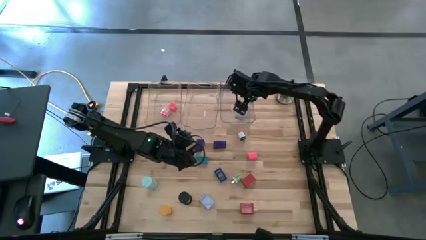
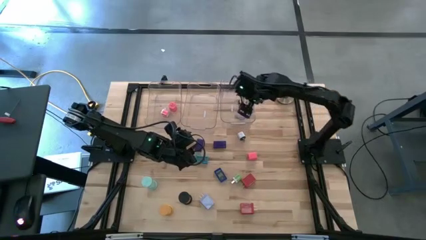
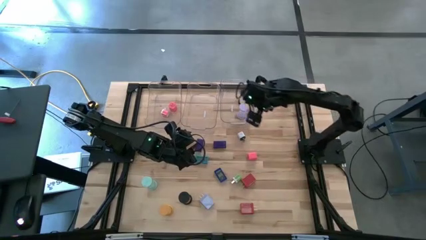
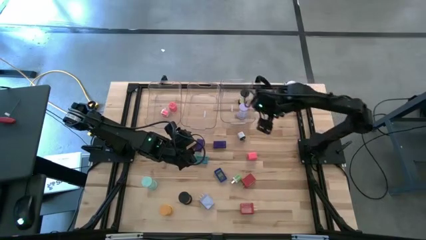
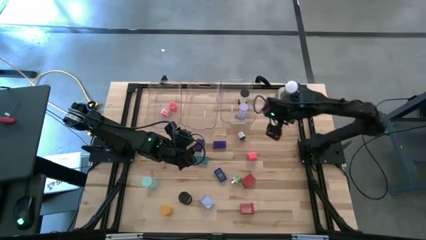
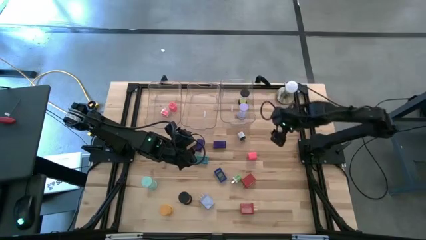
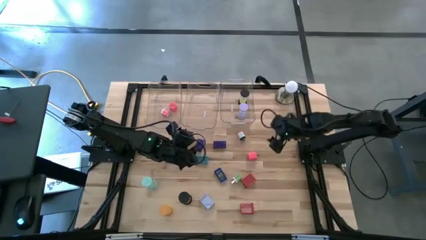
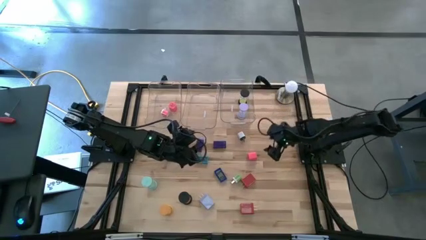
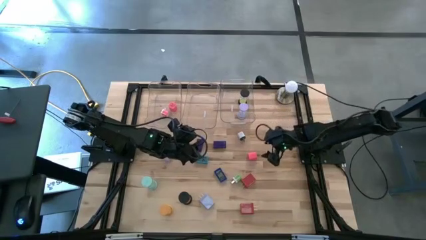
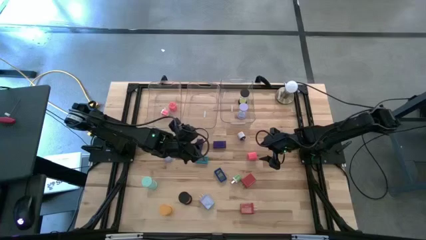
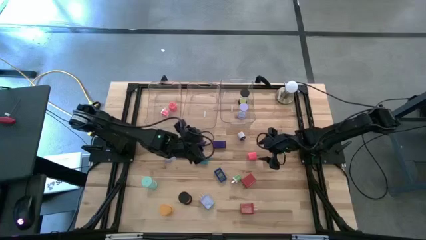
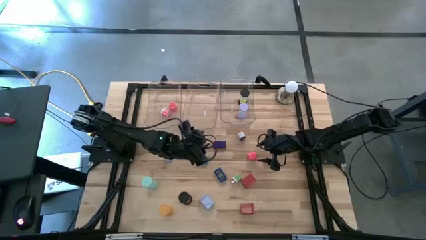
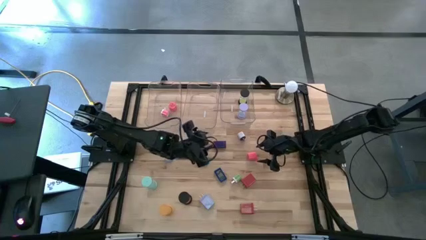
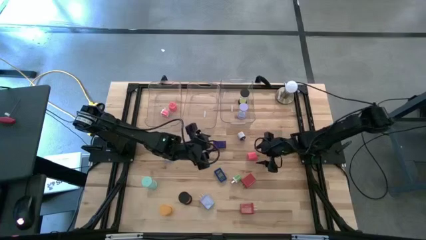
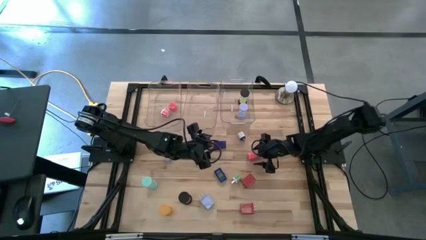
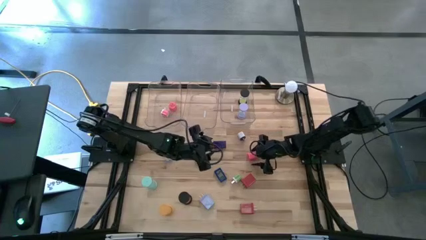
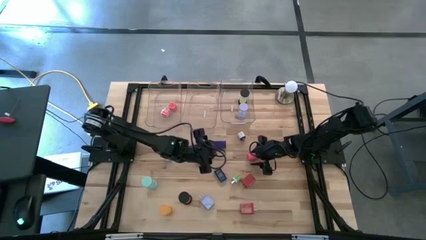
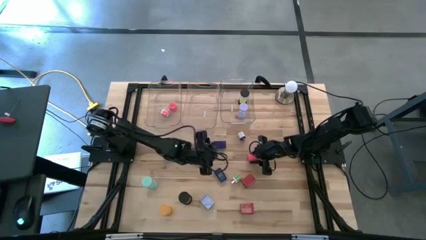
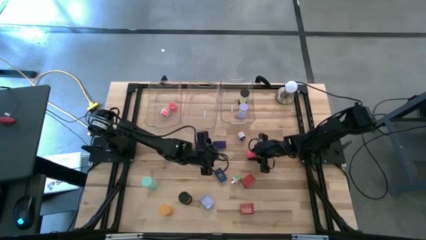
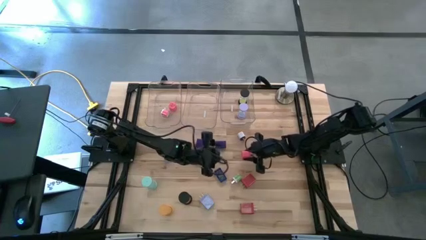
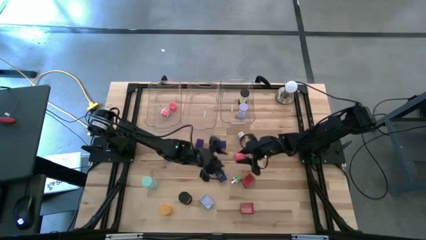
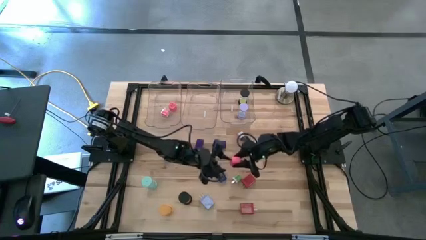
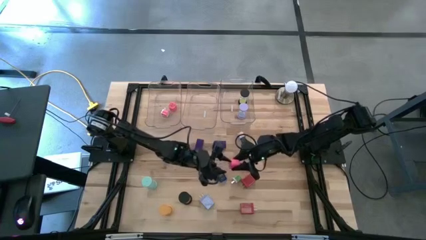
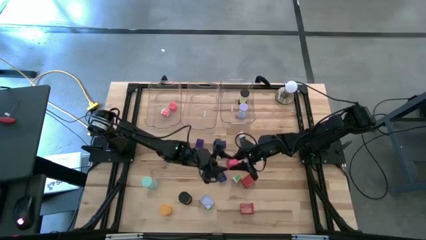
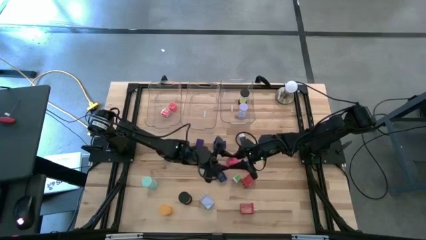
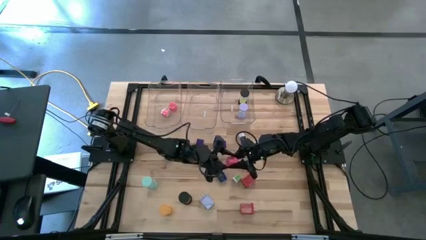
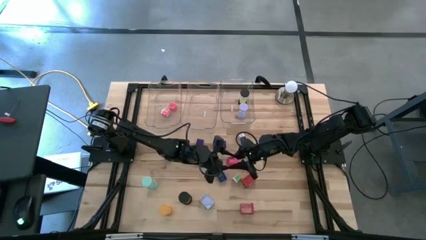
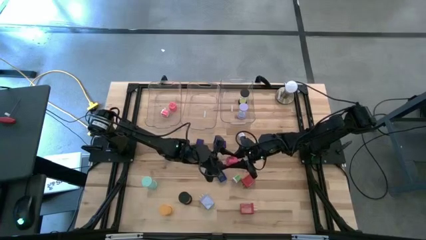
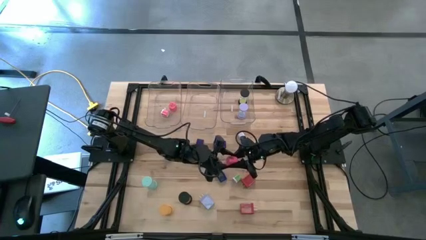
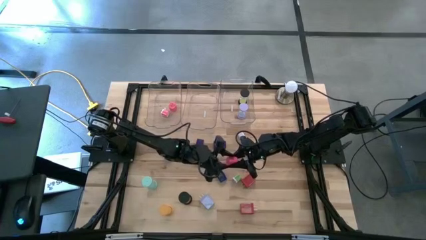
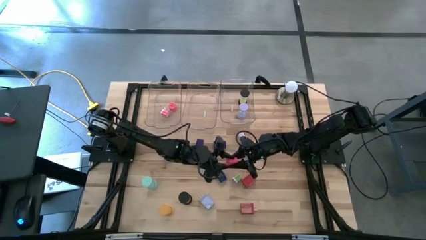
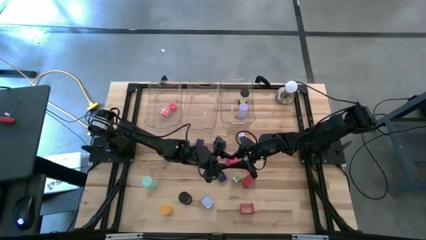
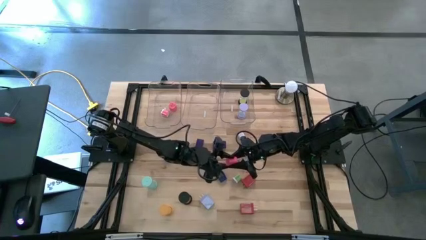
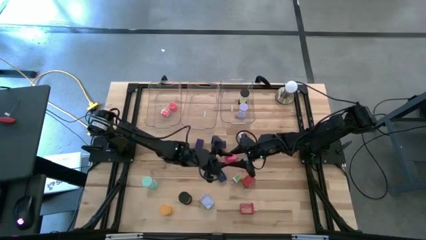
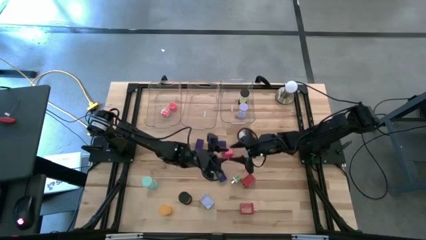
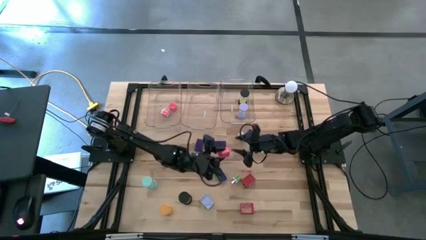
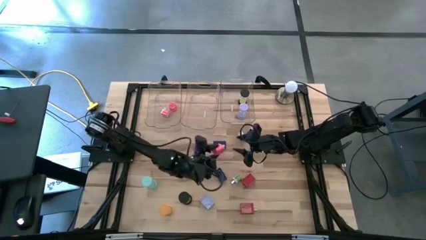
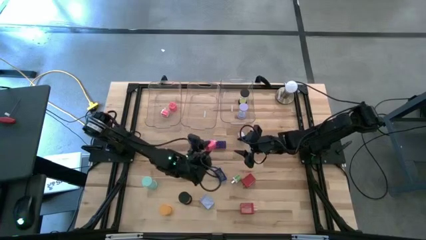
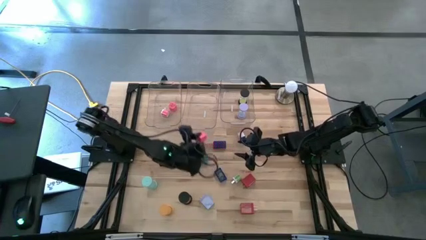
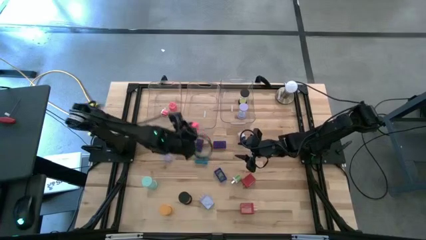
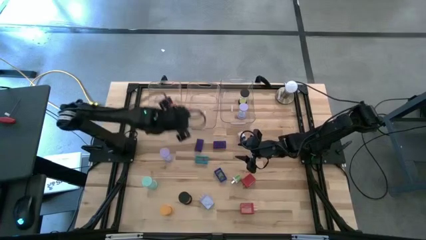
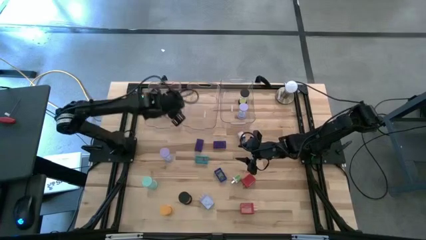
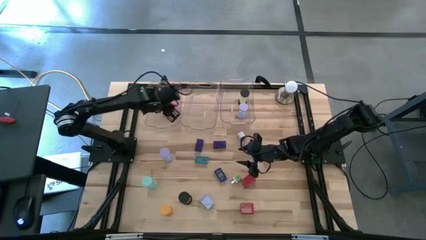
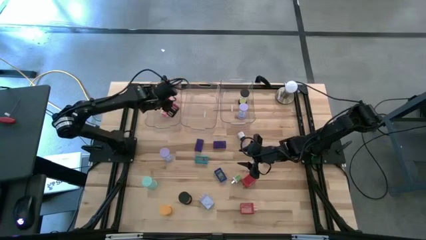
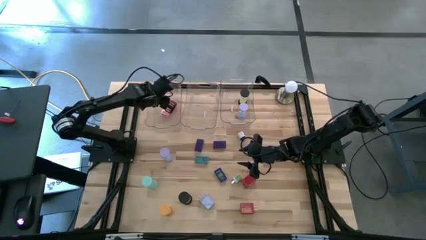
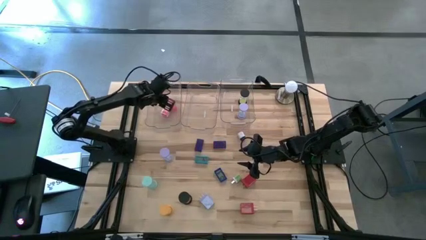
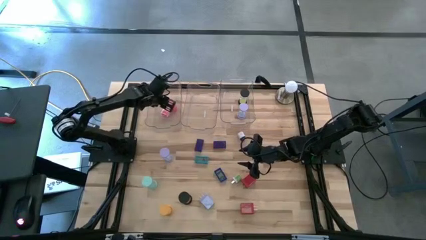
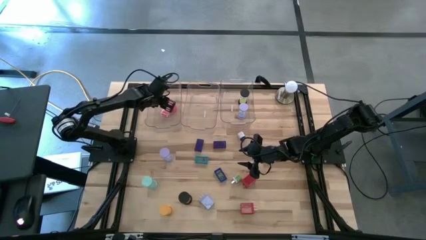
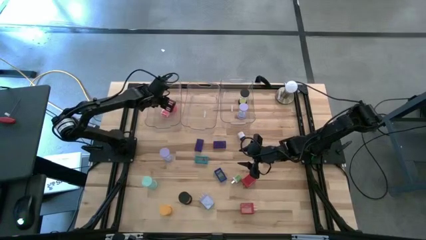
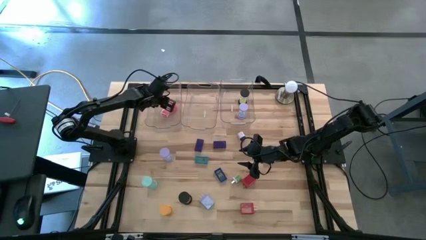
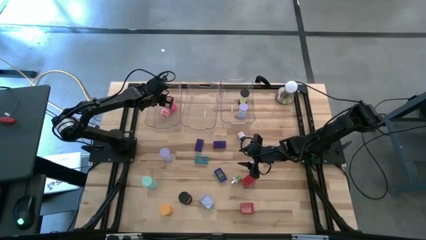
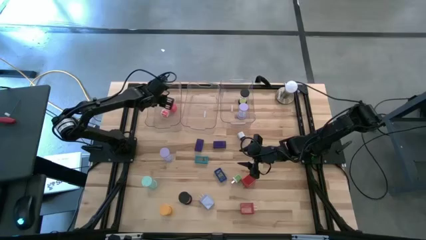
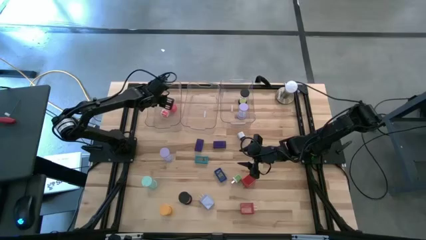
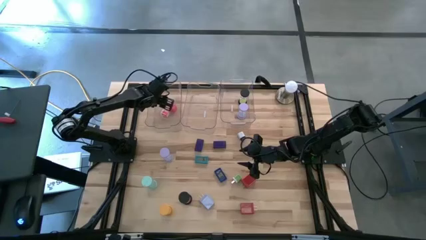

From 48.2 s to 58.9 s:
Task: Pick & Place Office items
Put the pink charger adapter into the left transparent bin

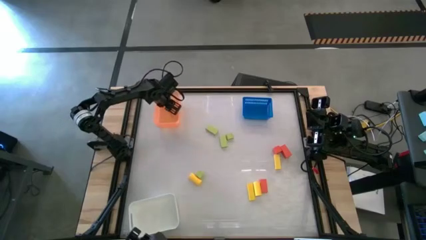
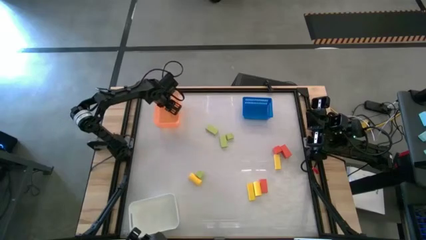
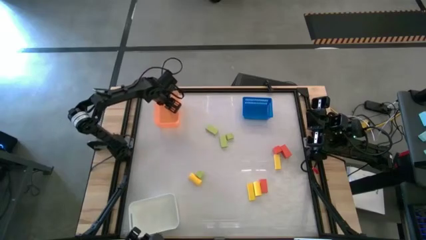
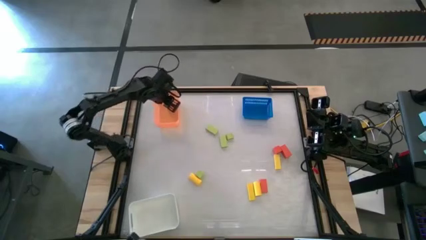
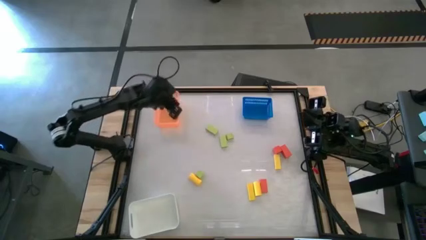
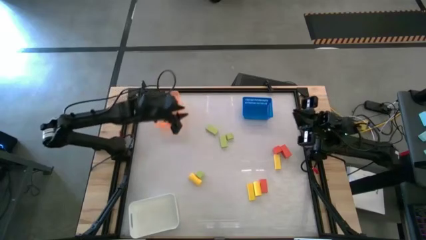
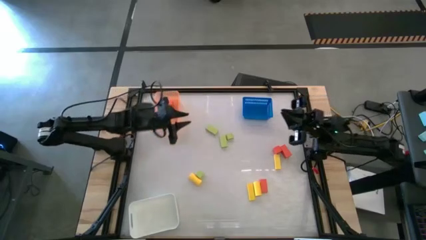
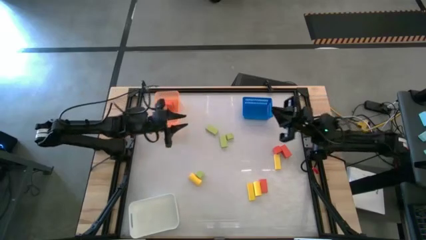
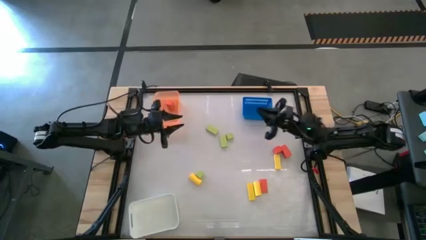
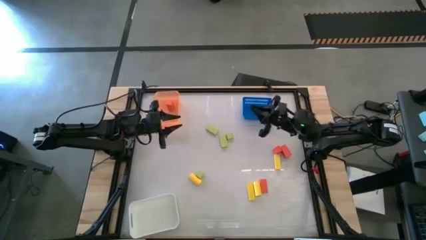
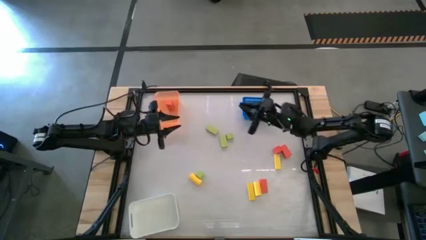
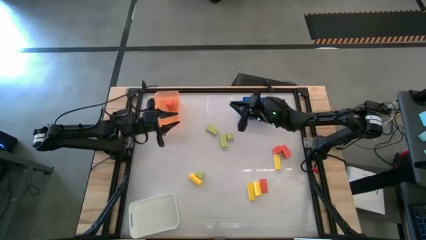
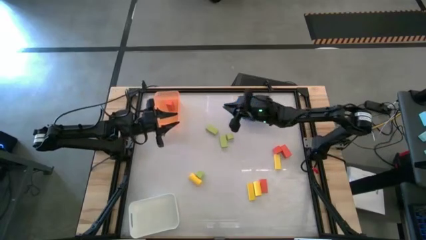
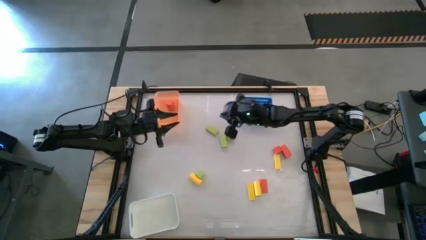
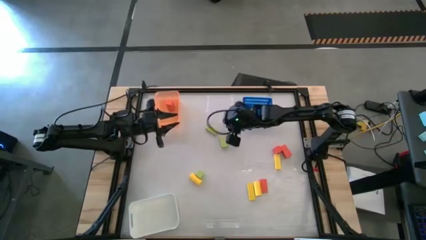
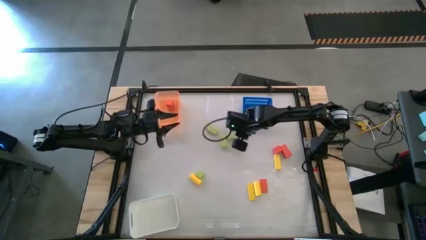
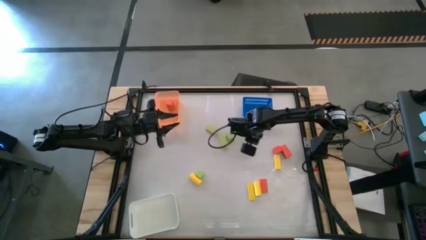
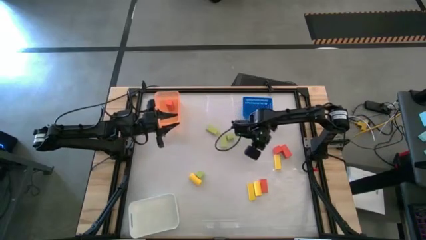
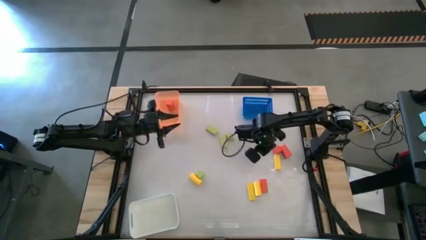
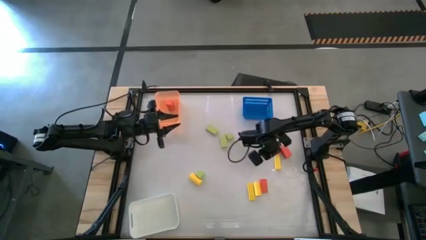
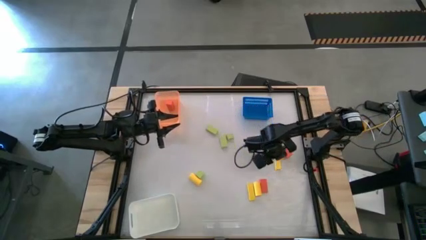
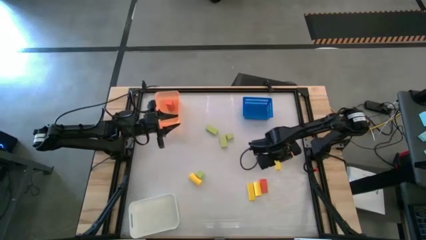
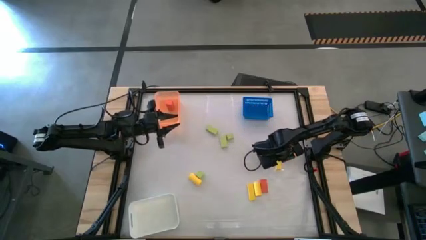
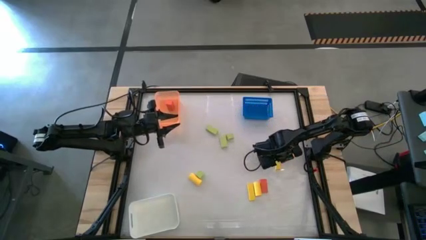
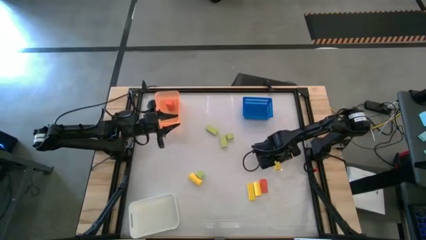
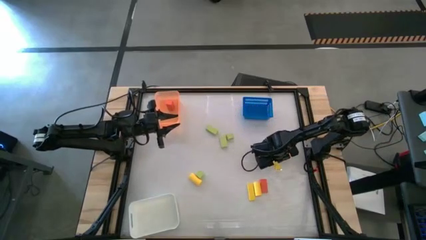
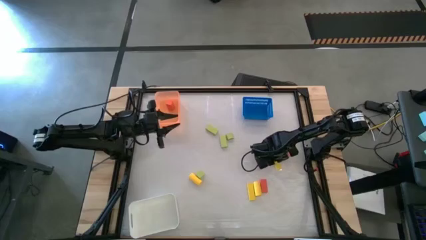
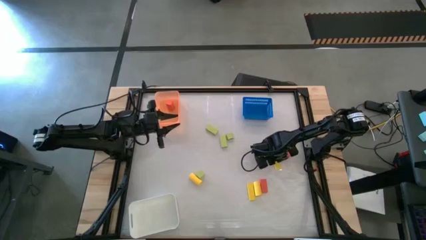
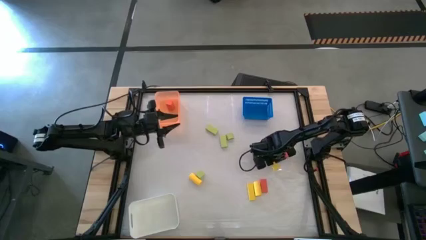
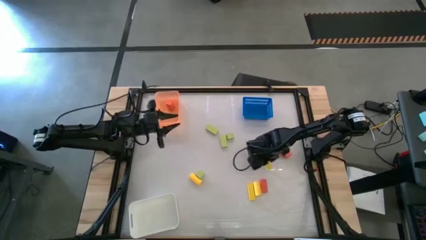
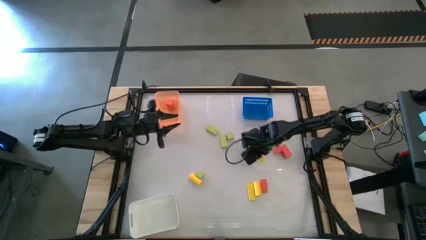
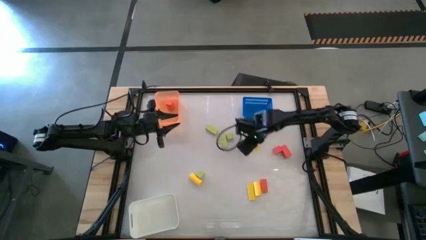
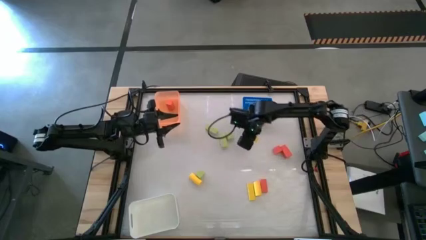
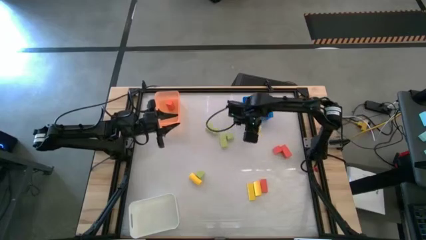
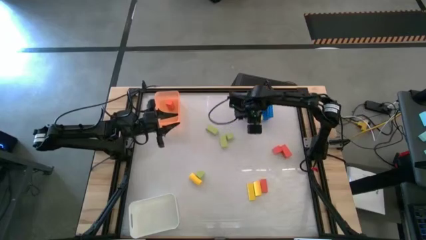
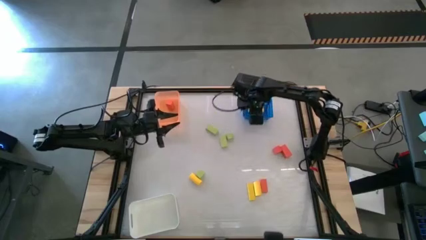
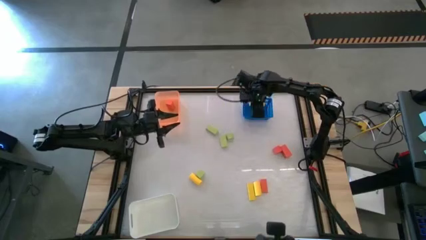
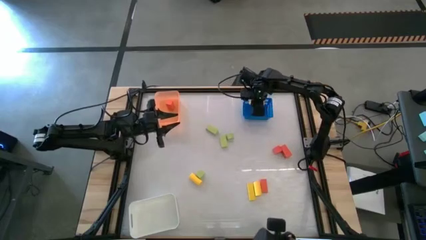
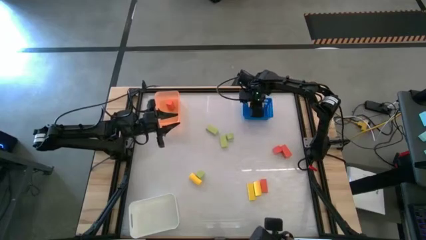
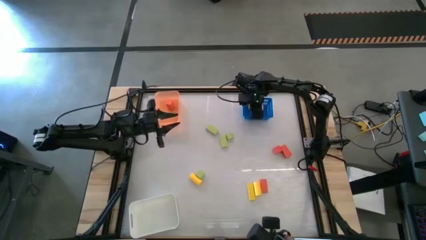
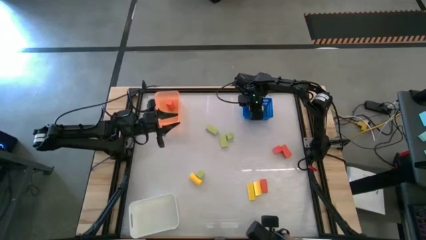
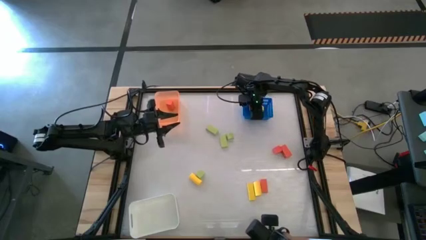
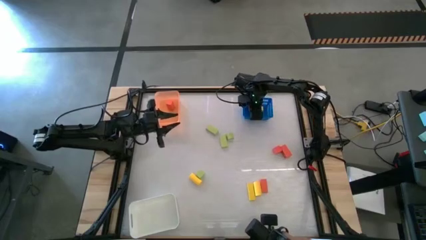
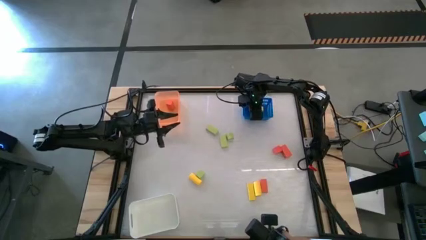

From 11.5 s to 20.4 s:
Task: Sort & place blocks by color
Put the yellow wooden block into the blue basket
